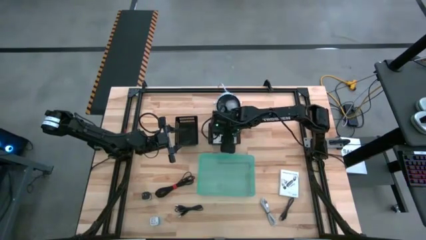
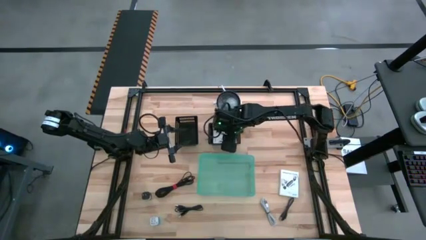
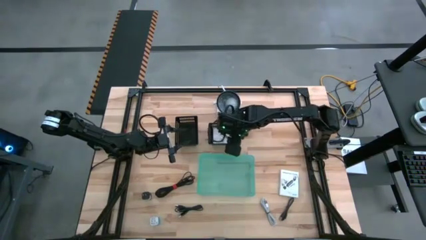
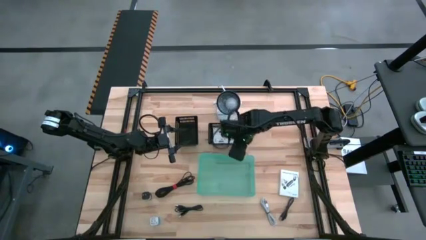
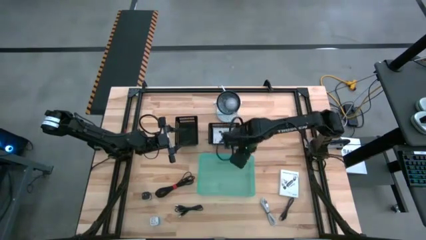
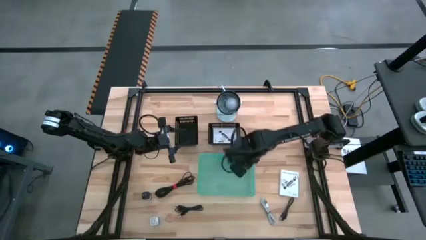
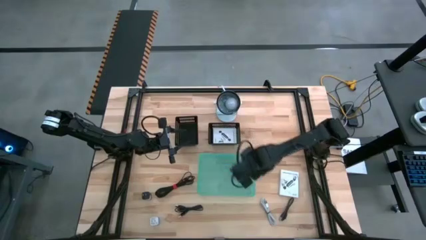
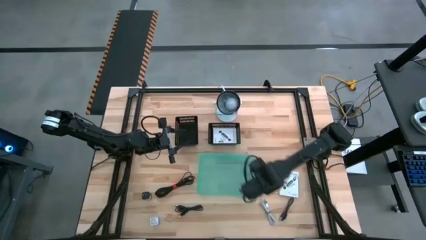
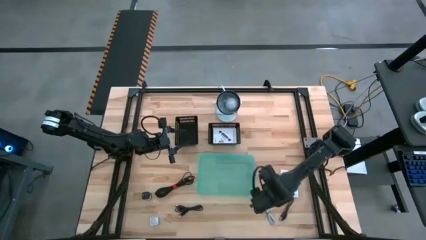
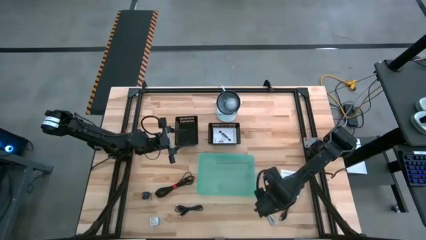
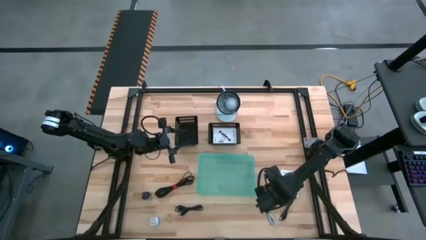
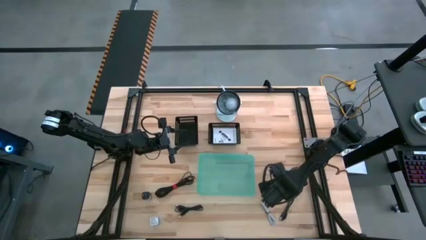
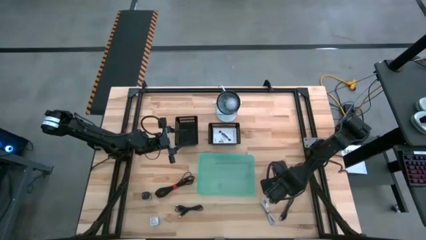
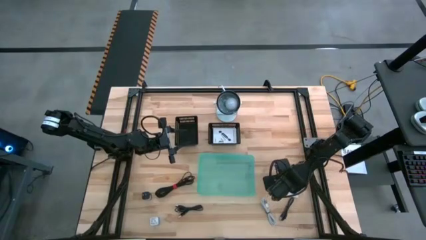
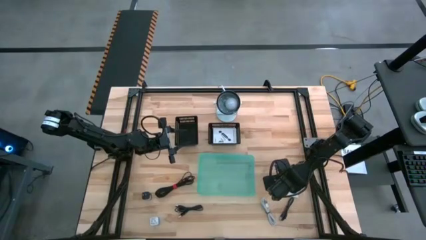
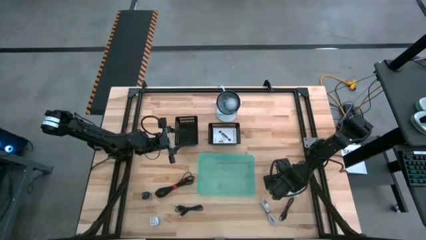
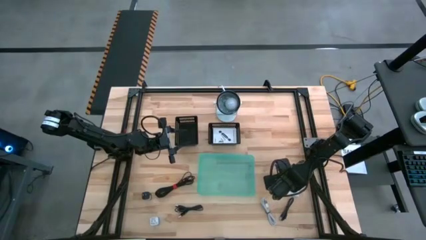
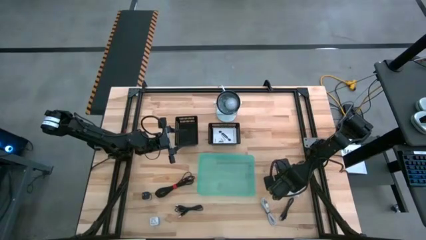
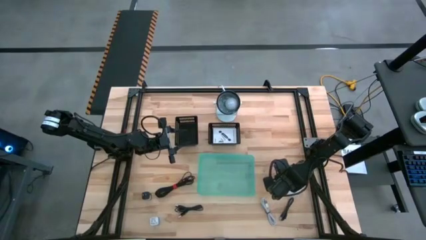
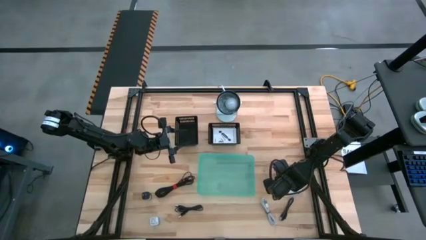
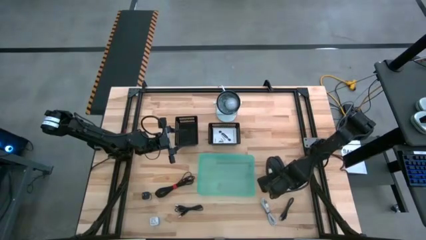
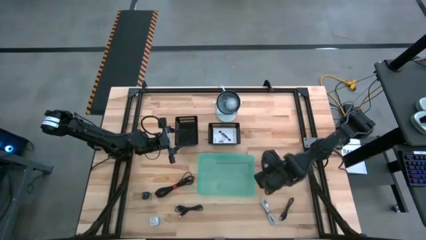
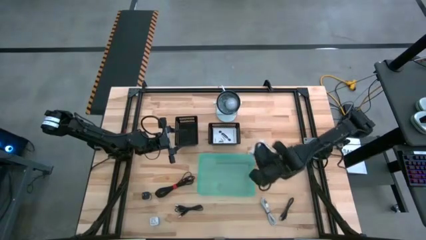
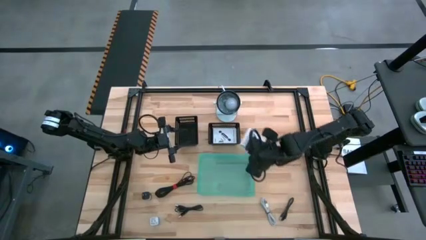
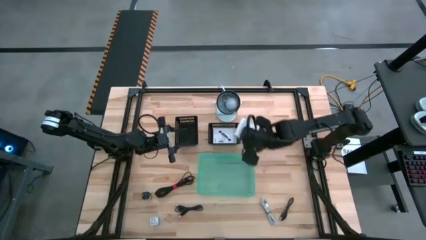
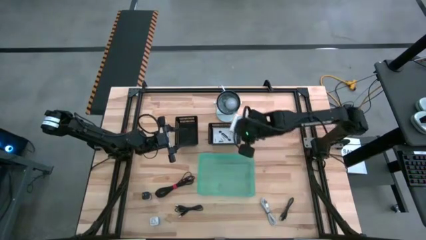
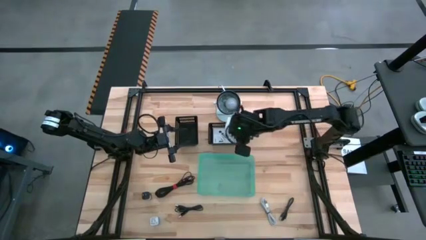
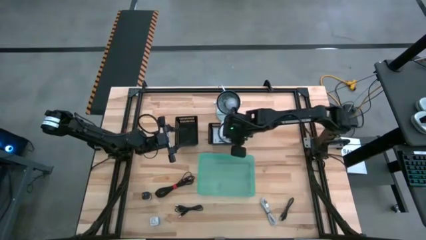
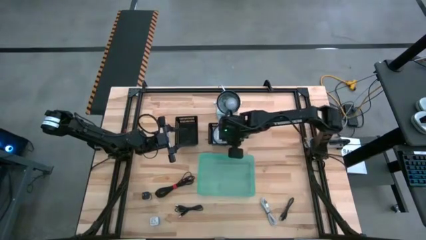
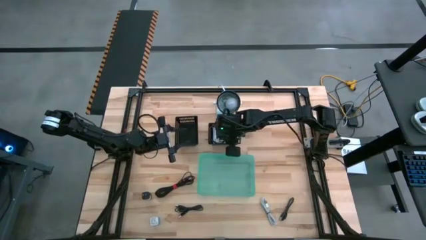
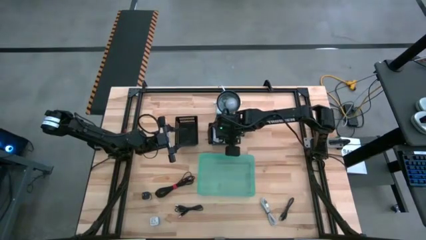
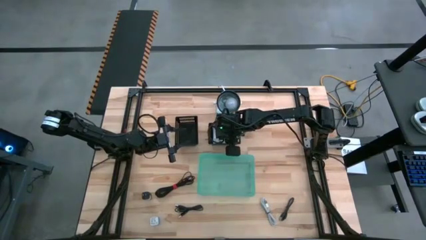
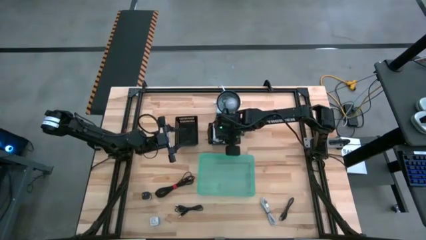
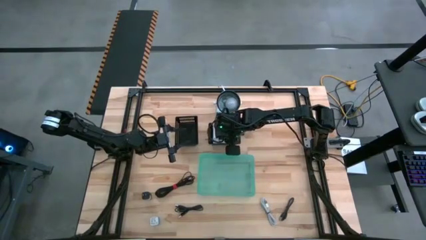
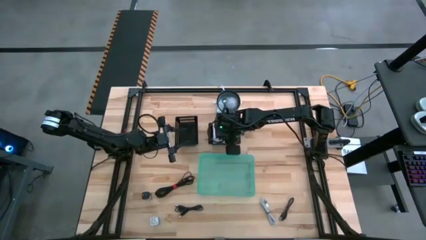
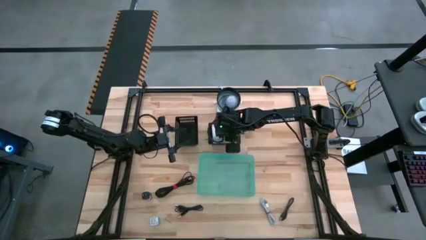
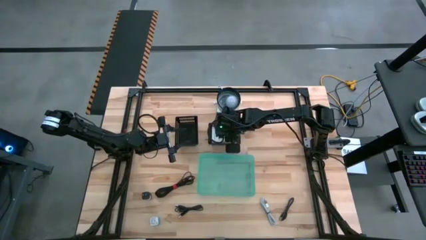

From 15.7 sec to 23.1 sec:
Task: Pick and place items into bin
Put the white box into the right black bin

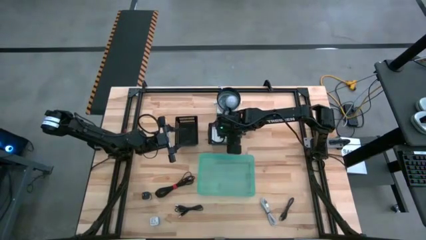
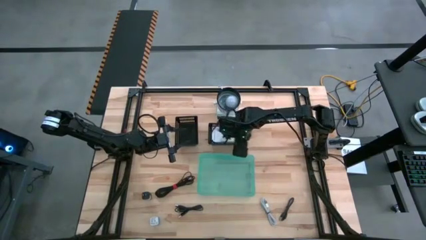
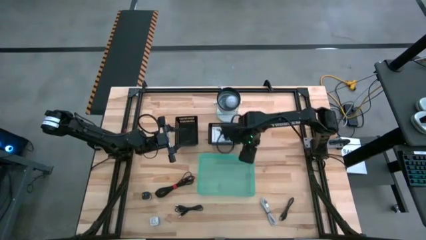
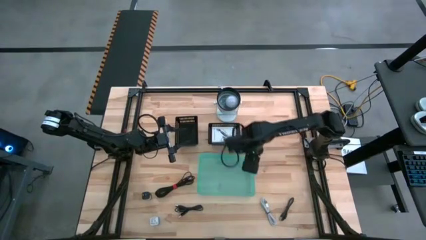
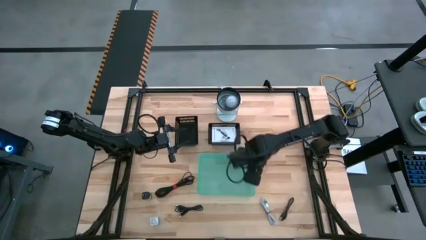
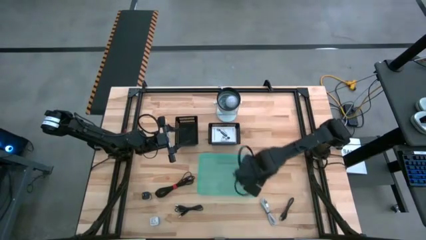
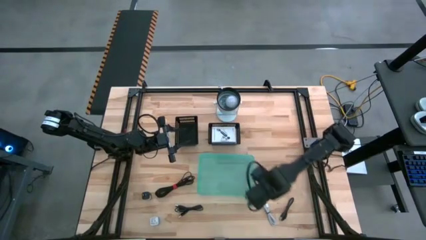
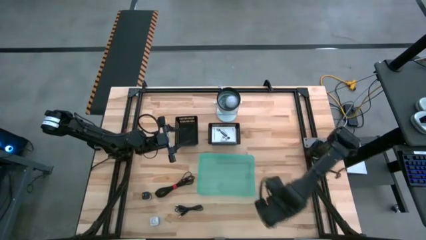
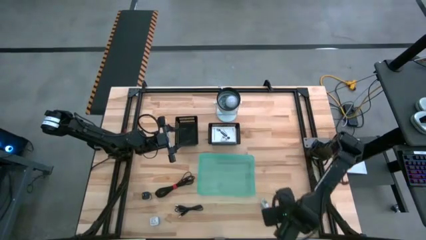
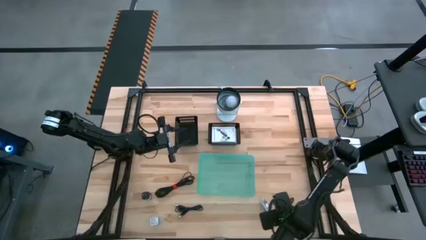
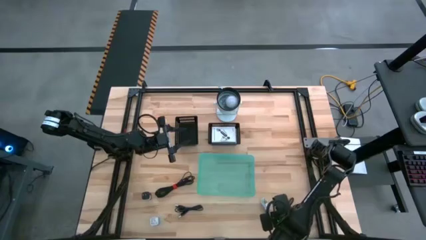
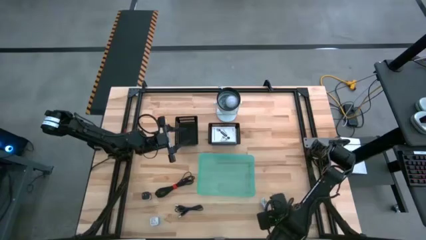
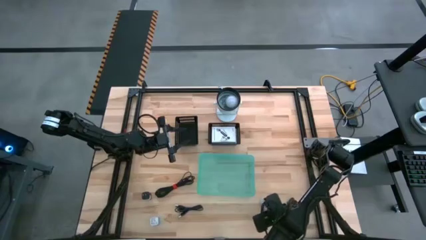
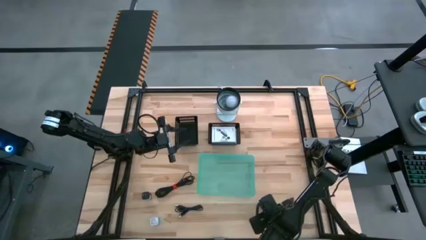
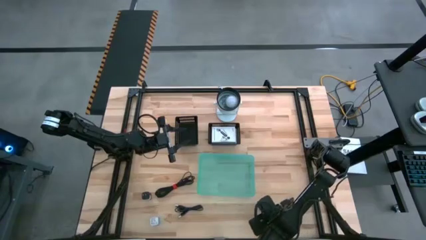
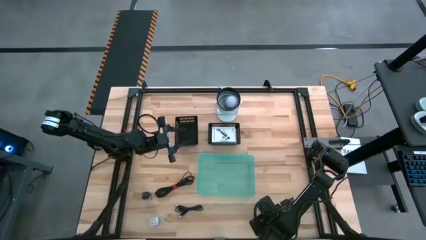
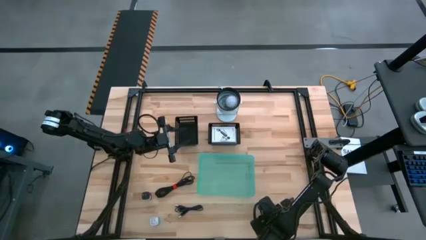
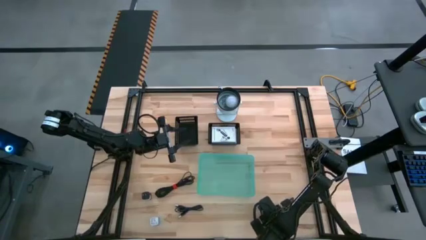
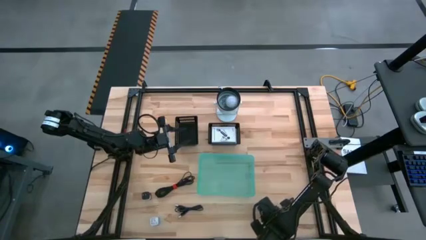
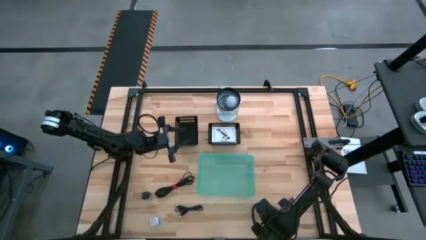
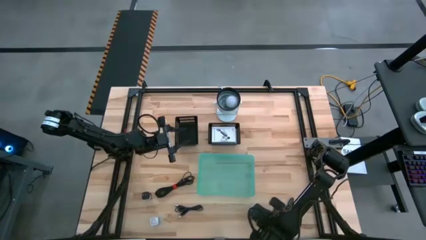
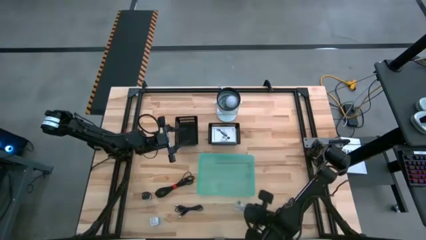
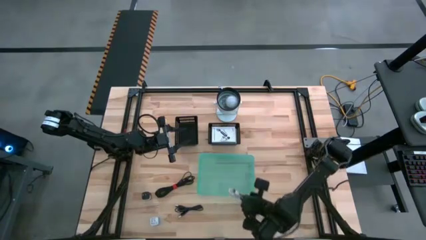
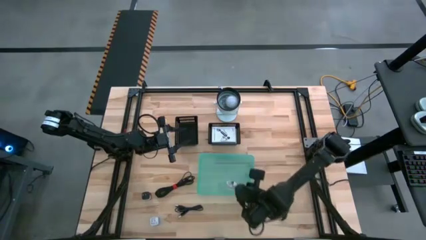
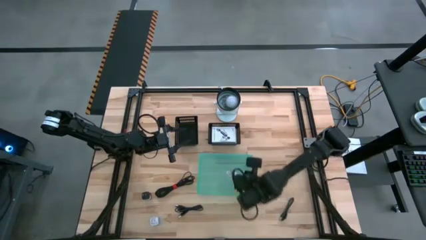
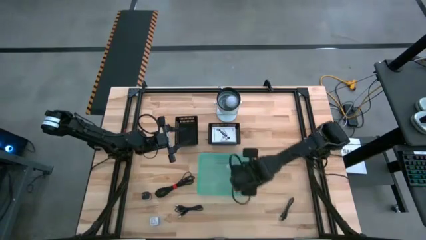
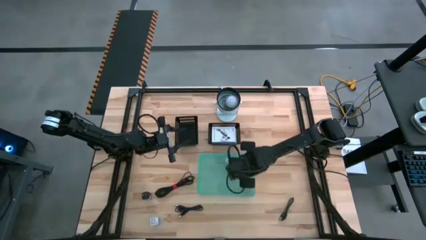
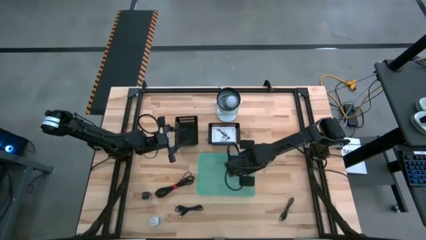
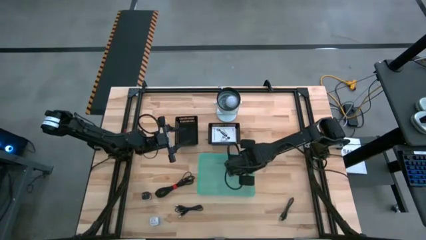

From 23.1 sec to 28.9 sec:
Put the white charger cable into green bin

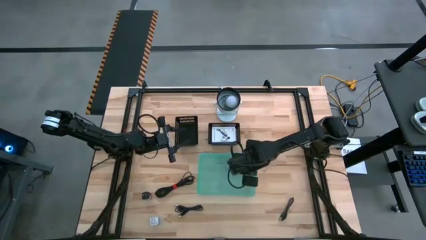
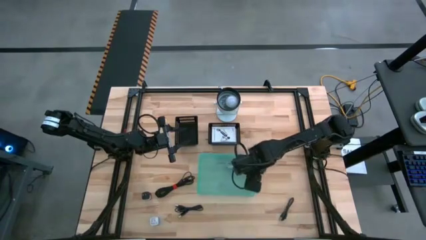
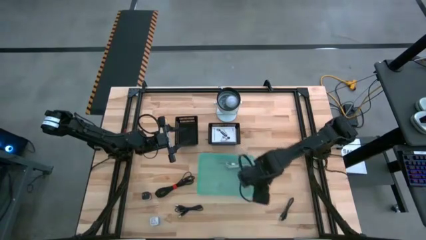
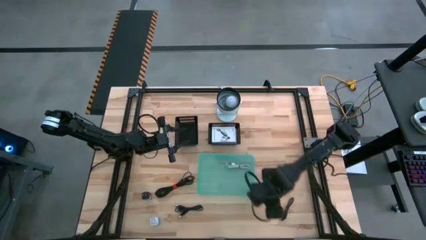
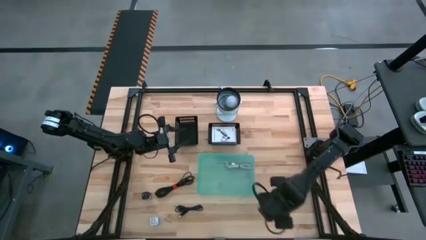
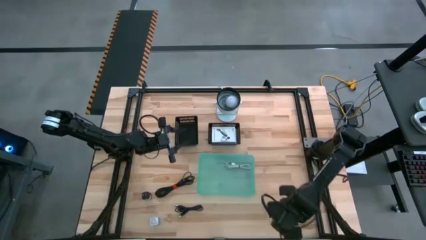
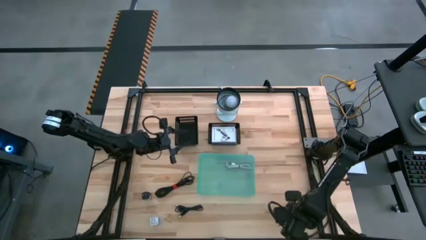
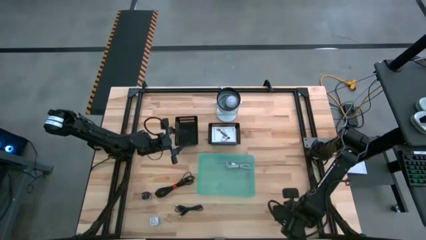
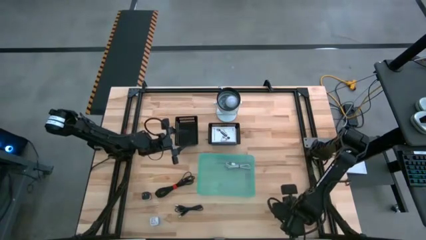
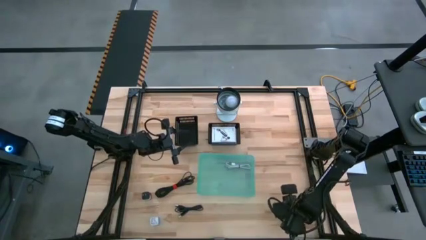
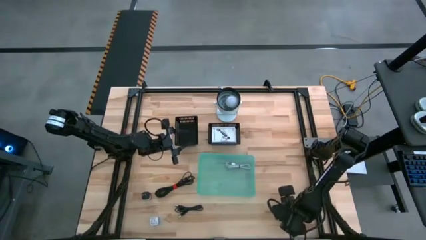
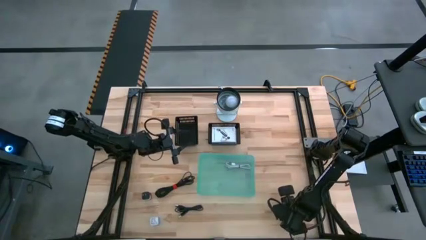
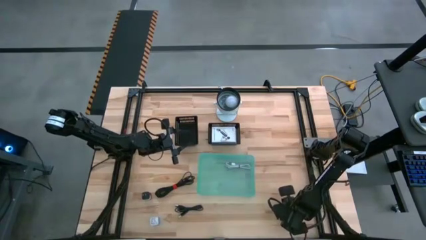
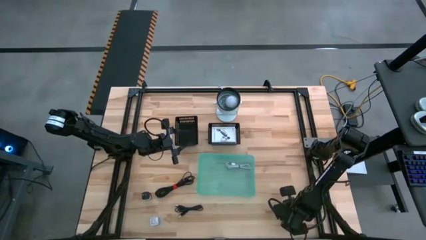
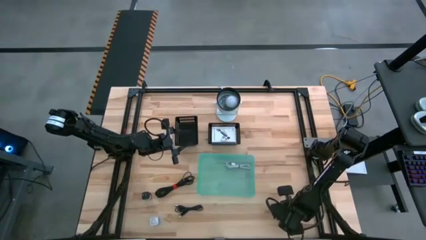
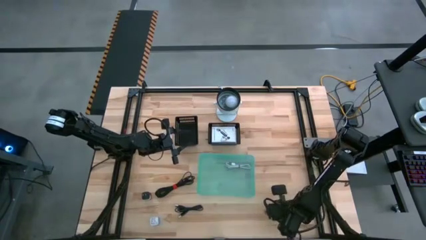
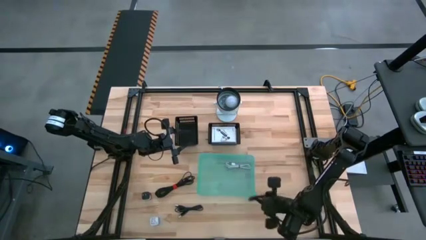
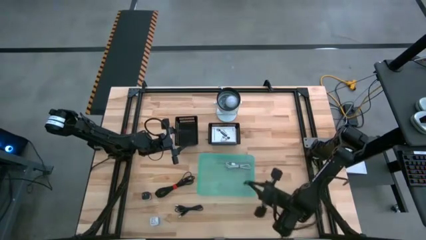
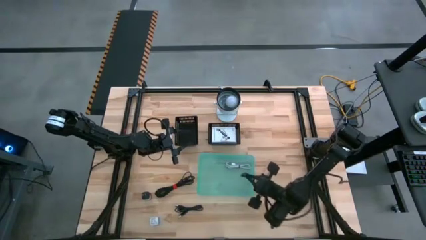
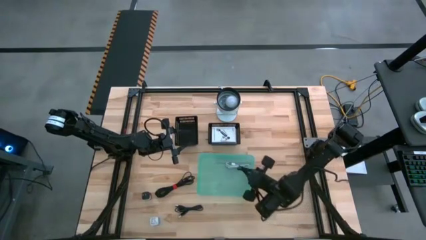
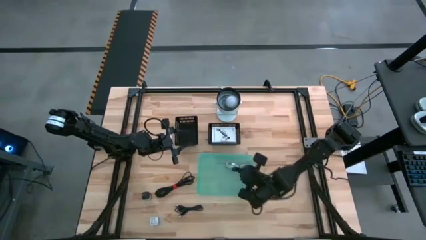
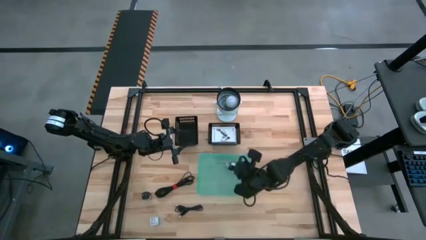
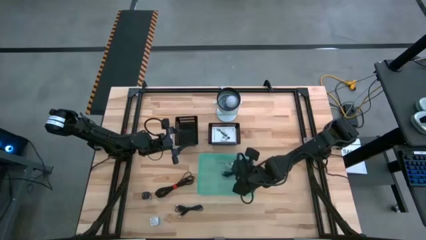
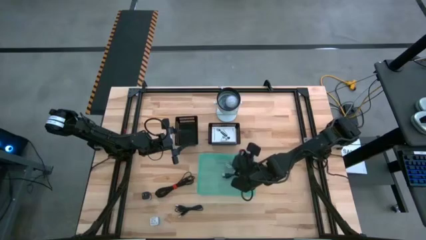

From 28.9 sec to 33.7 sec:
Put the bottom right black charger cable into the green bin
